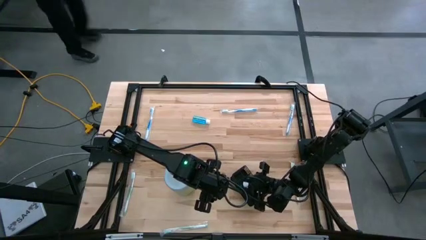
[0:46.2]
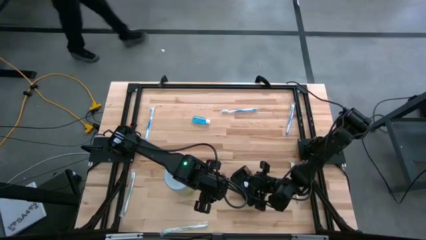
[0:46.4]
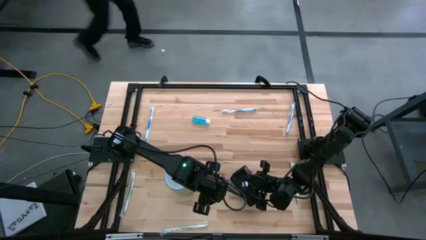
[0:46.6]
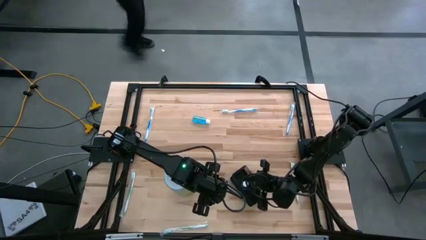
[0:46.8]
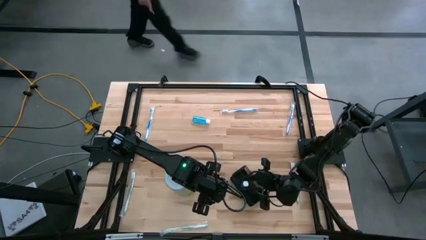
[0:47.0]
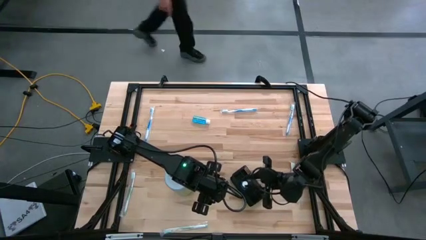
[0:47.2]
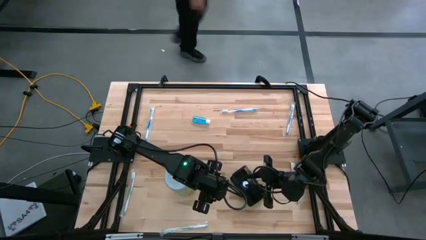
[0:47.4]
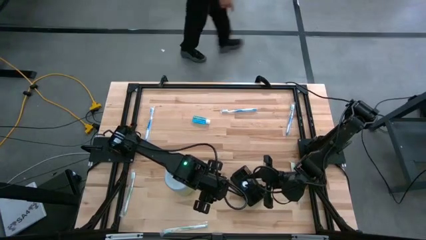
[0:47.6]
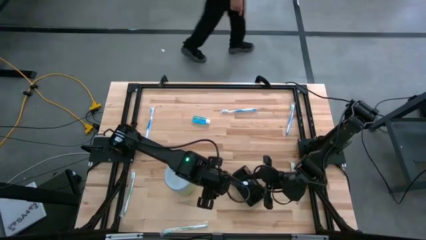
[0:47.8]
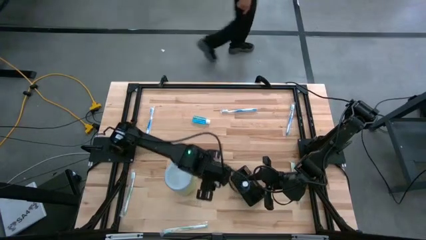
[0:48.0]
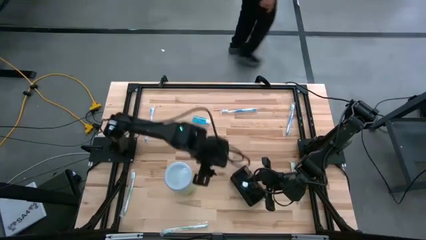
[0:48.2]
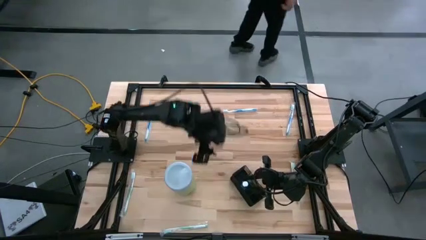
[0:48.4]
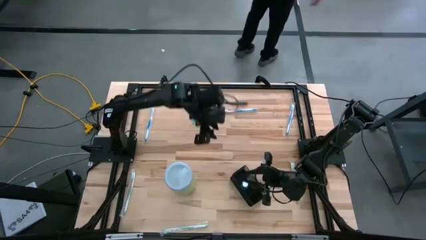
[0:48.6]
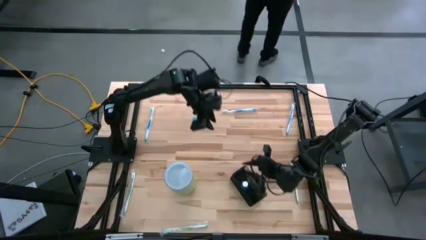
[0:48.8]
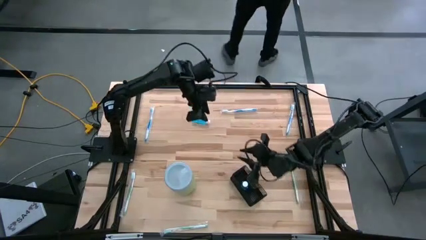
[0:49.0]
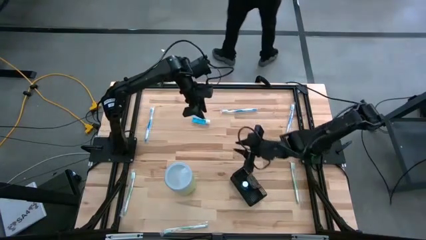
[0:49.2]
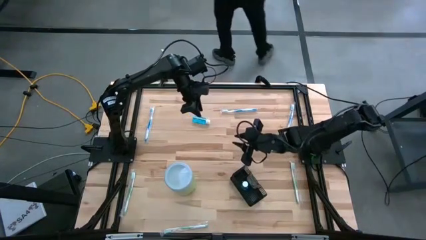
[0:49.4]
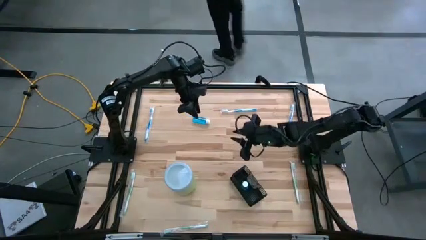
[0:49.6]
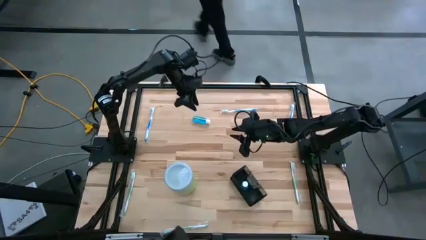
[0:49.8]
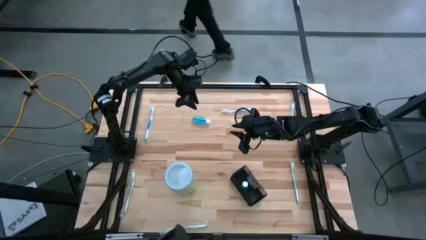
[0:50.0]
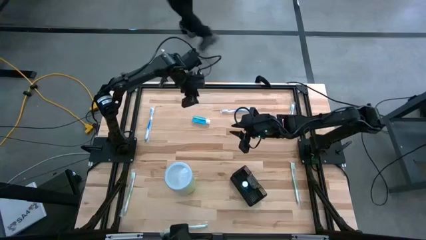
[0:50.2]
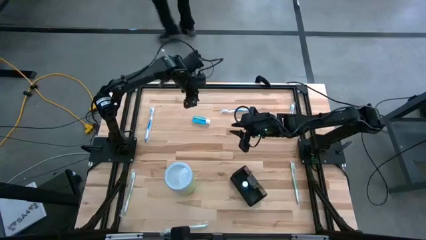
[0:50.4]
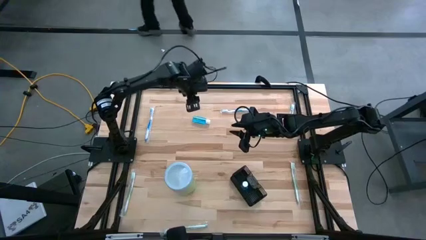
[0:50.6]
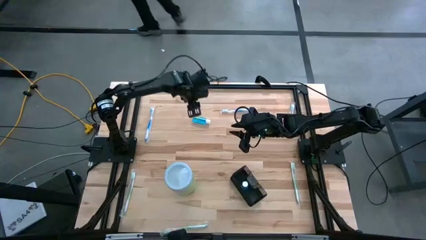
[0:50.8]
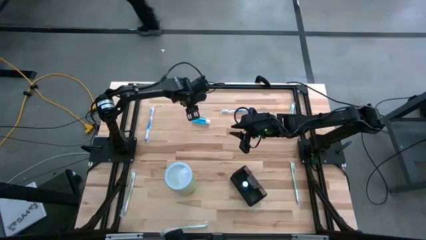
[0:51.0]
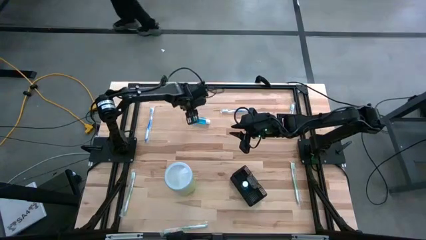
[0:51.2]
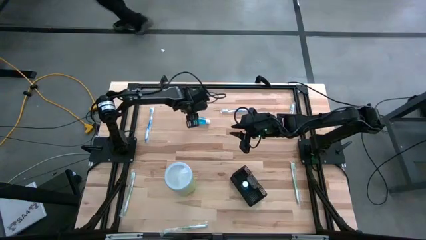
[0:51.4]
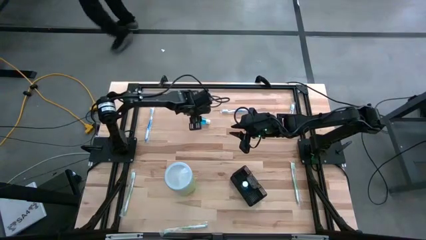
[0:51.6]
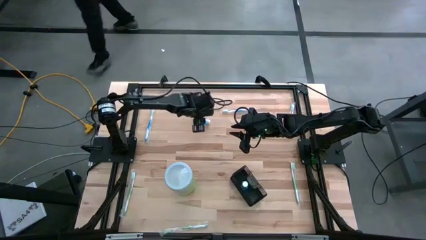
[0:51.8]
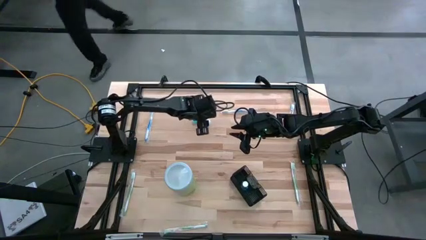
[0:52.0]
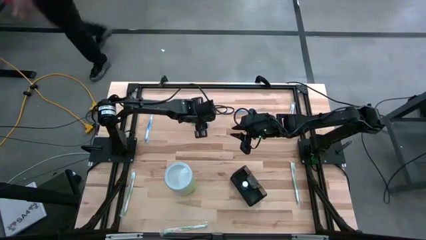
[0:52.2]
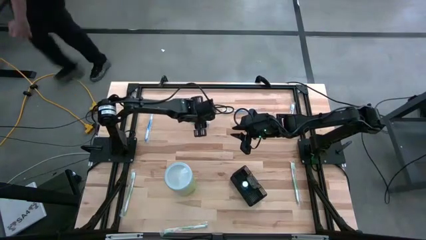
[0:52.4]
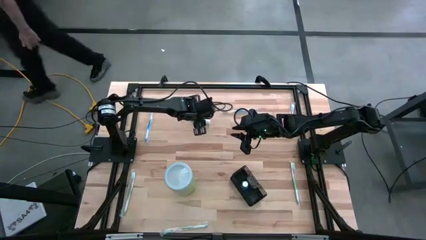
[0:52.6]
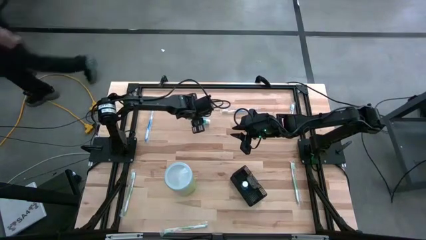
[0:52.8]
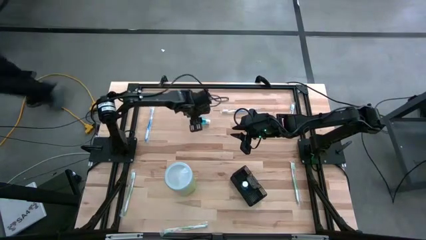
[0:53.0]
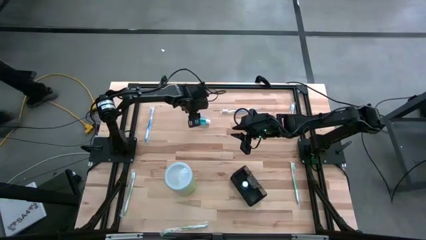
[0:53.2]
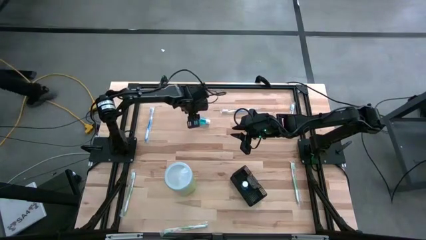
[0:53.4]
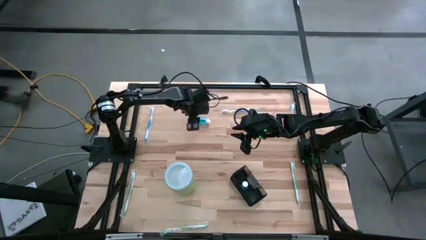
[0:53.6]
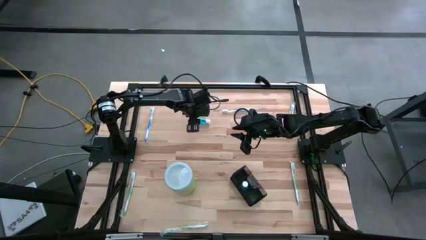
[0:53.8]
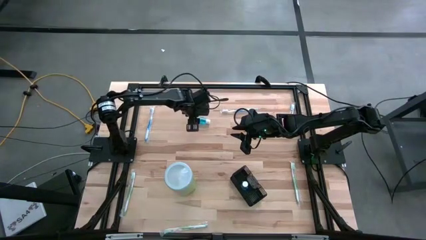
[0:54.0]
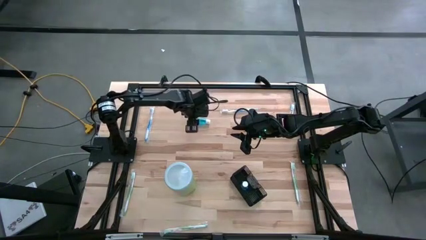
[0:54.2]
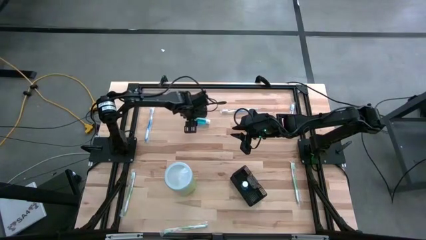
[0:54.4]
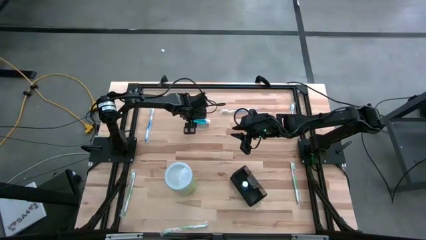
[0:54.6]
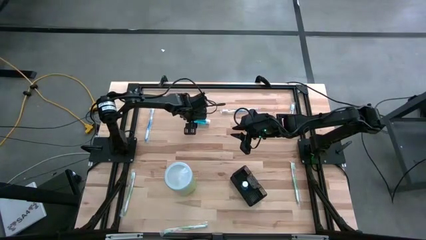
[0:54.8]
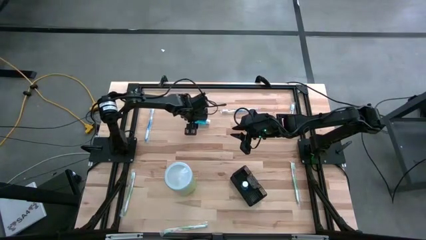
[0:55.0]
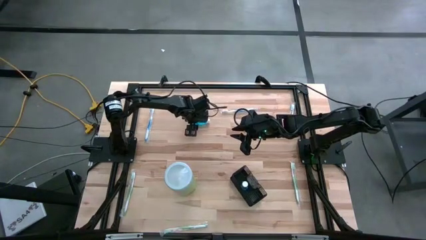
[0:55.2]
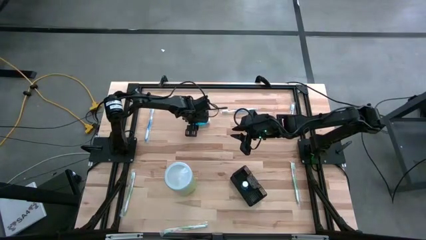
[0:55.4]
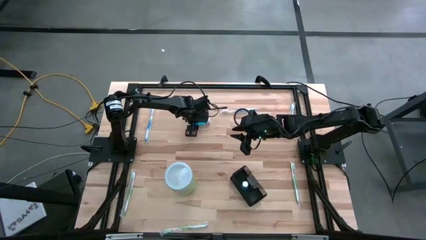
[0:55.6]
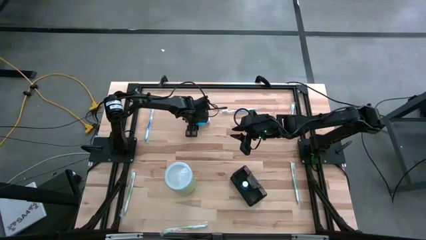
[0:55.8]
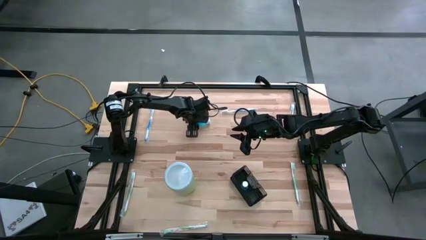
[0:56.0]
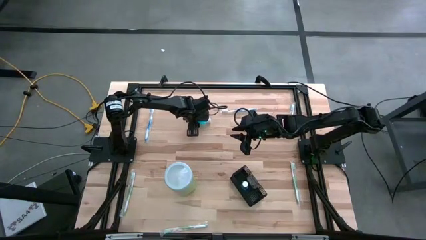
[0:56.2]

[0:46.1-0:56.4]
Task: Pick & Place toothbrushing station
Put the blue mouthwash into the black mesh organizer

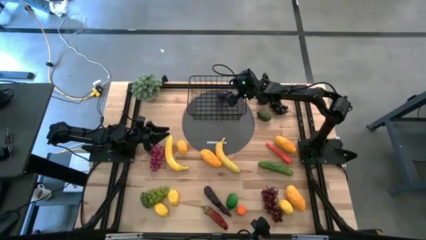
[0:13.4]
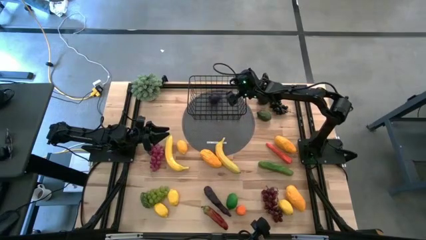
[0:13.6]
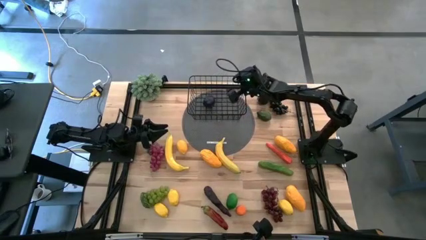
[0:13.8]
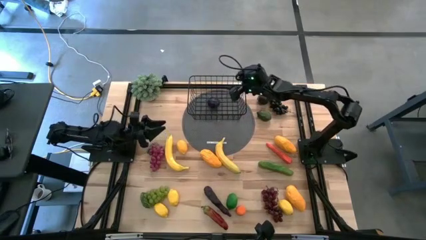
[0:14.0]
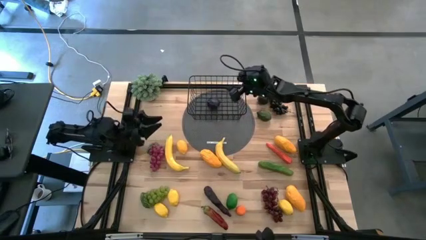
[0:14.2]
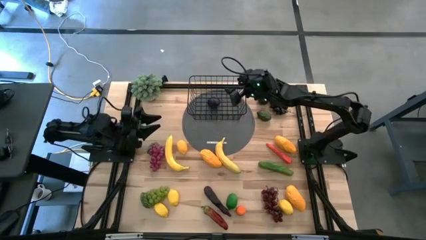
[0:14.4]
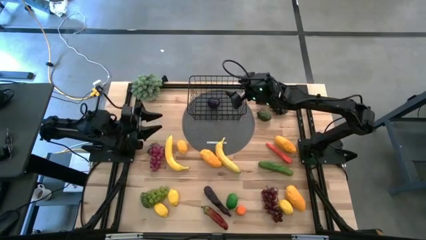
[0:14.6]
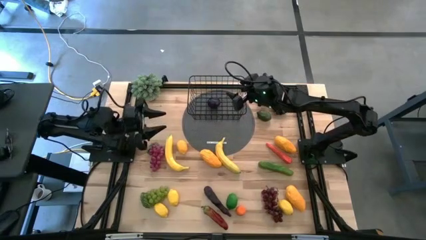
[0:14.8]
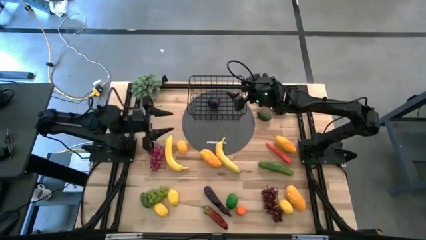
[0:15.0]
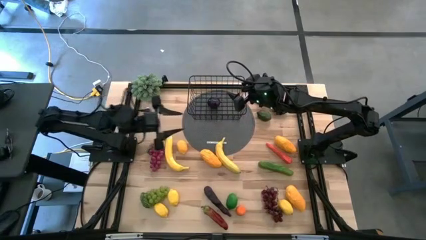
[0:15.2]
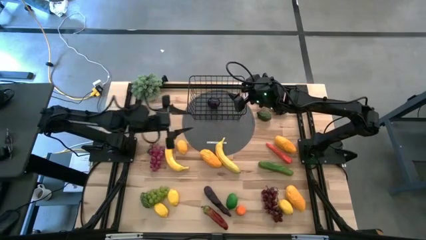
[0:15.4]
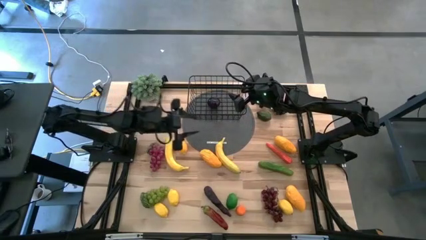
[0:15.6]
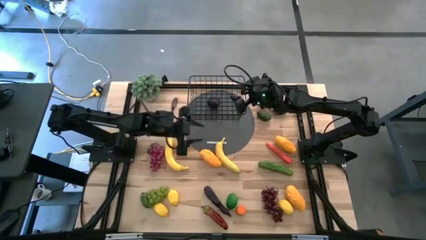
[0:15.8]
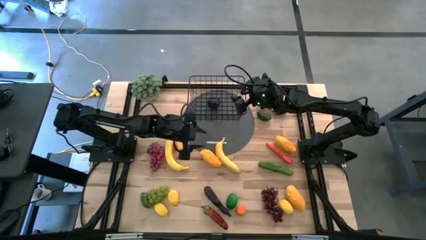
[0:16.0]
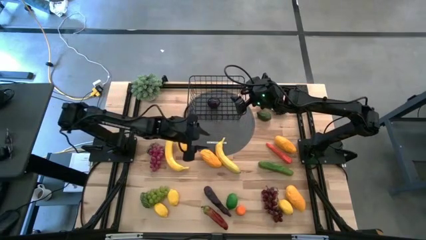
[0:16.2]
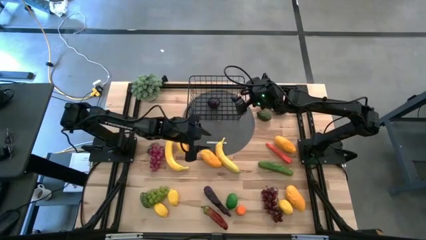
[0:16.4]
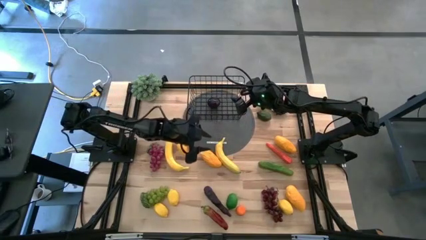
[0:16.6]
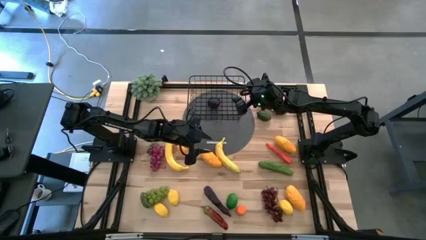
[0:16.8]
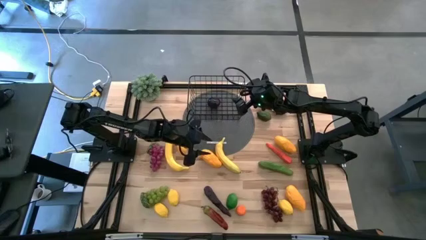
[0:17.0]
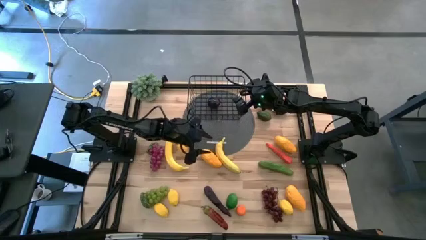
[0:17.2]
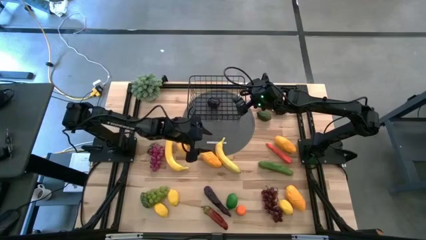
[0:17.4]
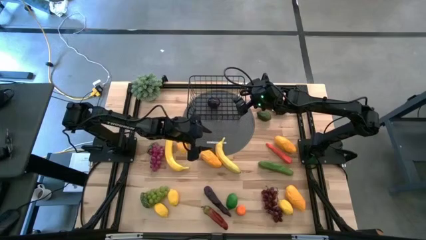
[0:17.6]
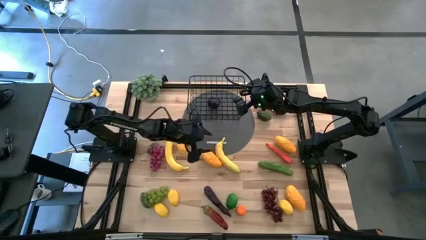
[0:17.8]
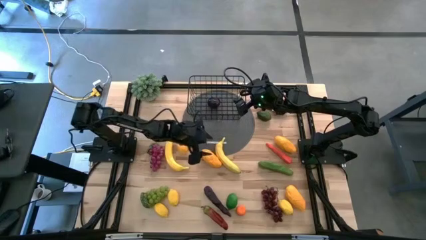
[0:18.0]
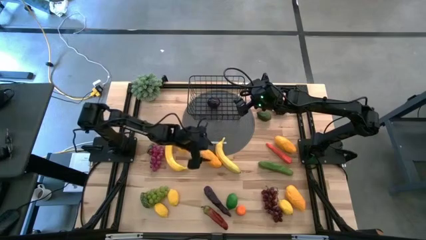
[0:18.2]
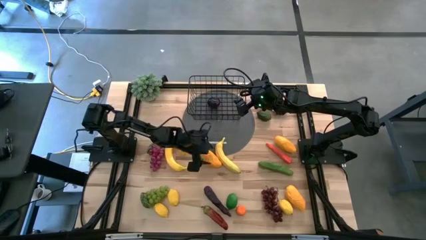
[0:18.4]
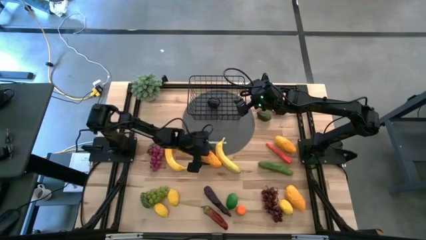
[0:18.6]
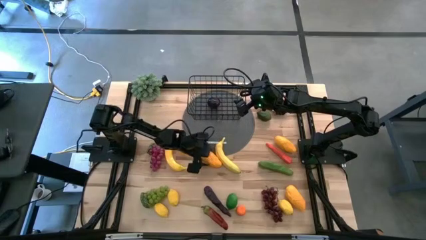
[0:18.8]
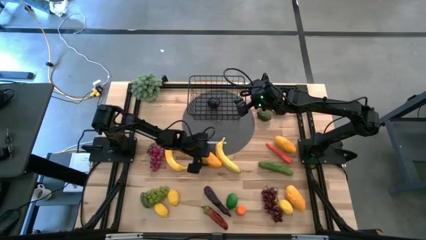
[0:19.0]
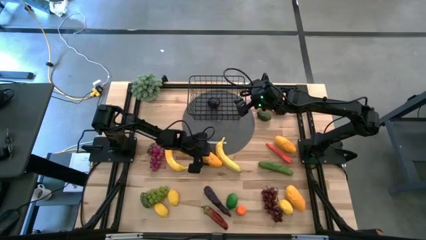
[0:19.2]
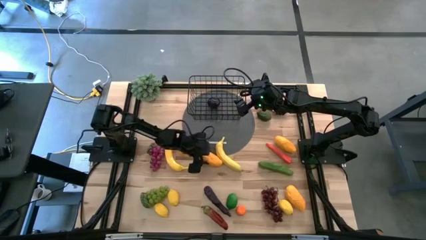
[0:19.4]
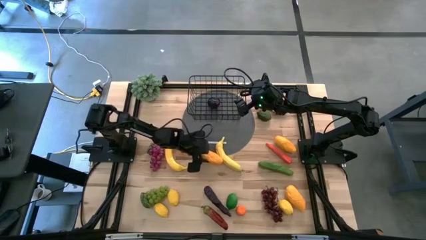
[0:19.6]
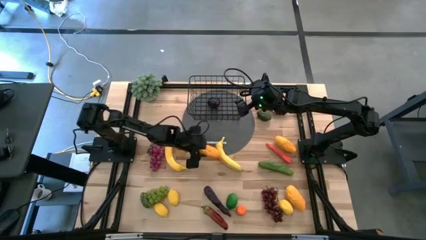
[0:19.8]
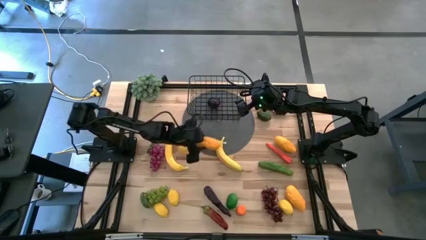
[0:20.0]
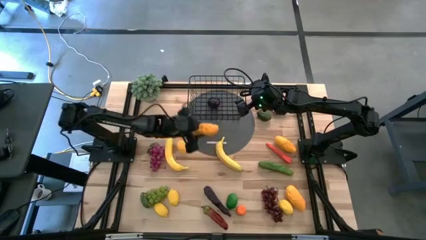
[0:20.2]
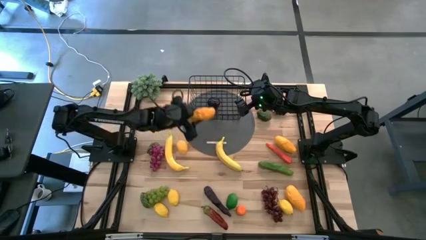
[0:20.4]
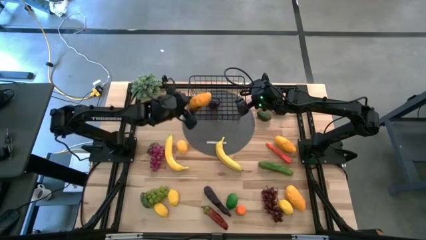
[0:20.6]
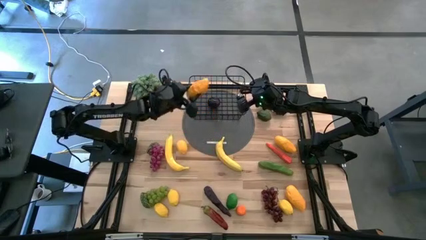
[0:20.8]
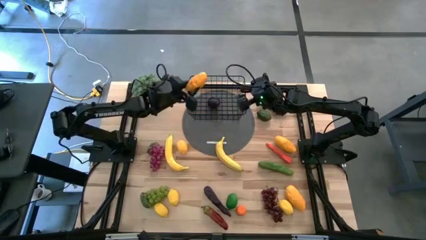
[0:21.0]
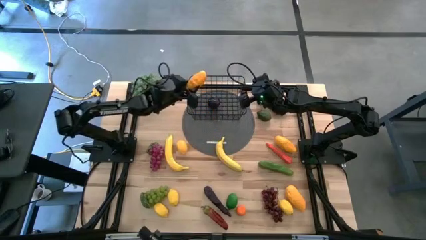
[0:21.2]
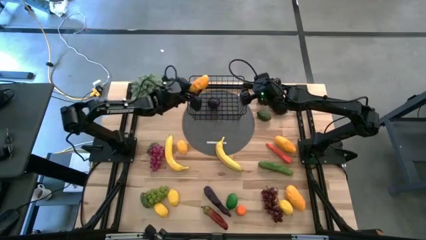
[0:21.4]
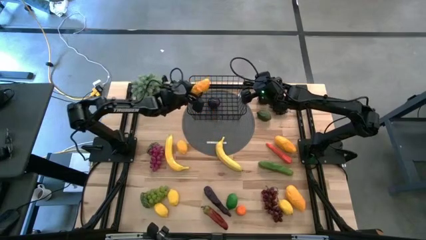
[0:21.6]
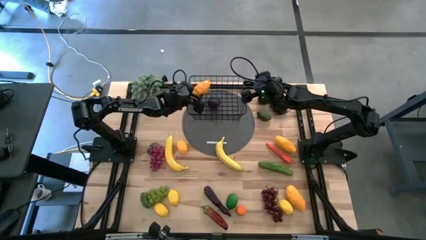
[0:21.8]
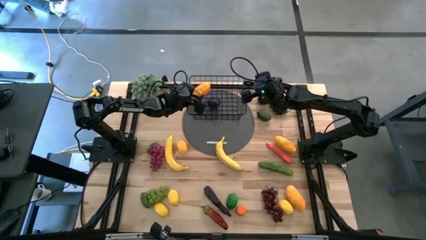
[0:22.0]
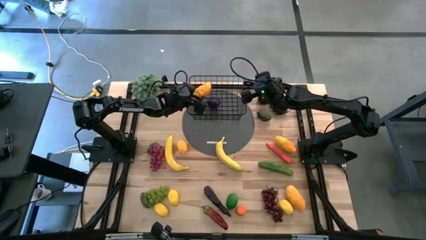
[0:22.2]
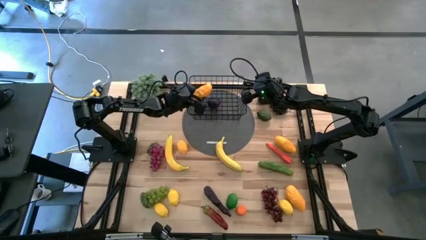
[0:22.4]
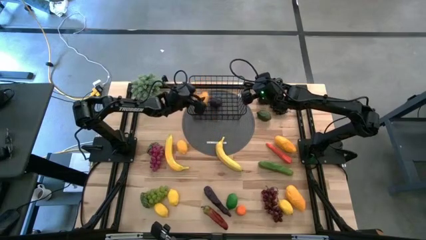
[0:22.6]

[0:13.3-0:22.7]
Task: Build produce basket
Put the yellow mango into the black wire basket
